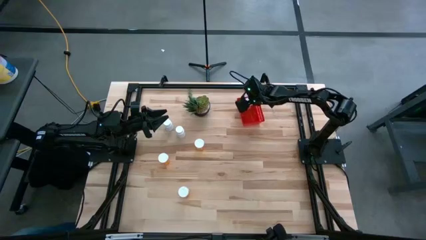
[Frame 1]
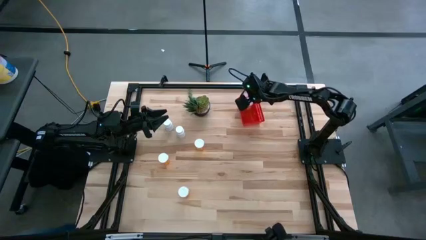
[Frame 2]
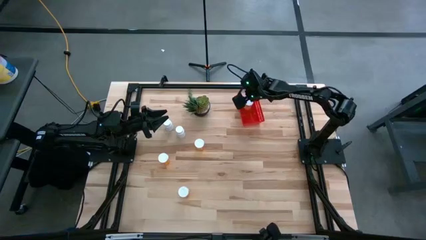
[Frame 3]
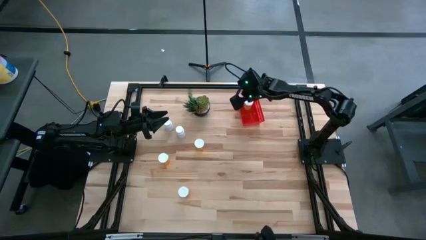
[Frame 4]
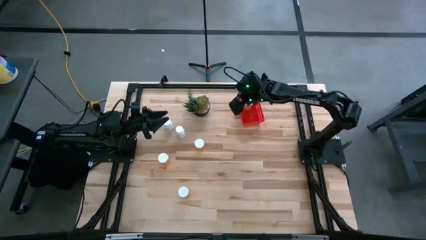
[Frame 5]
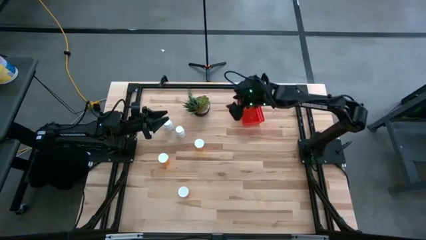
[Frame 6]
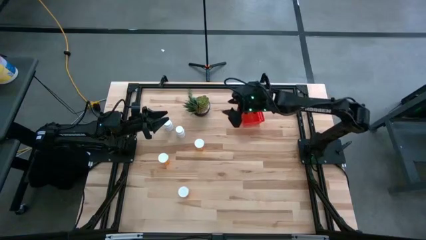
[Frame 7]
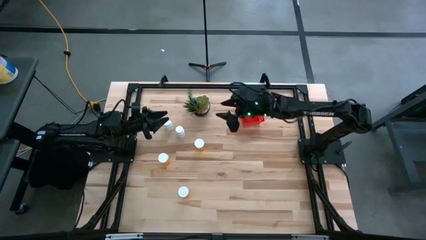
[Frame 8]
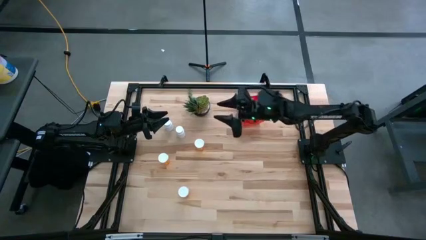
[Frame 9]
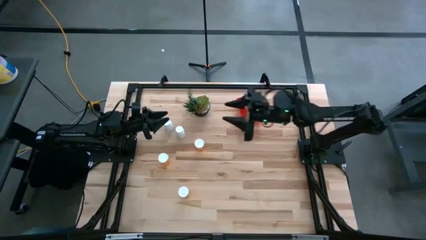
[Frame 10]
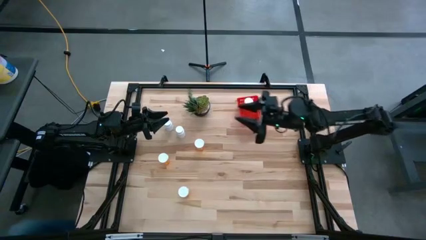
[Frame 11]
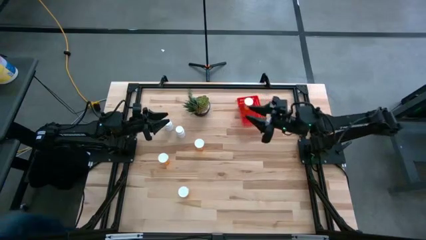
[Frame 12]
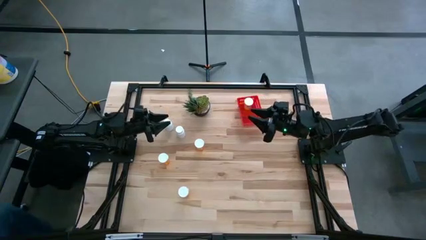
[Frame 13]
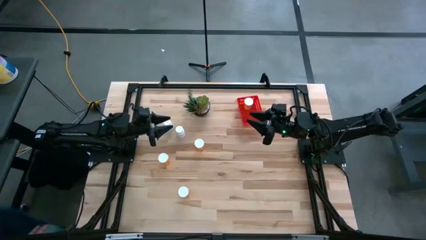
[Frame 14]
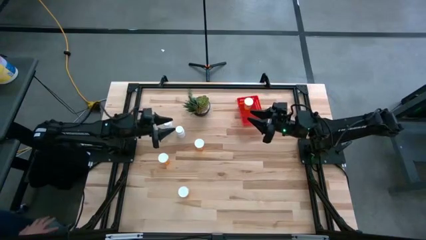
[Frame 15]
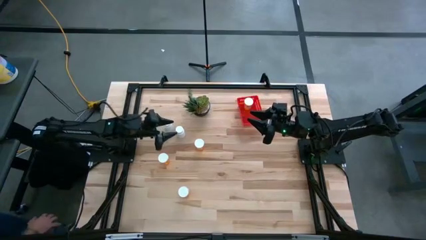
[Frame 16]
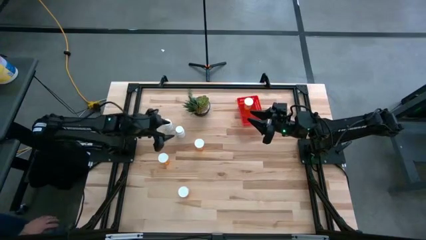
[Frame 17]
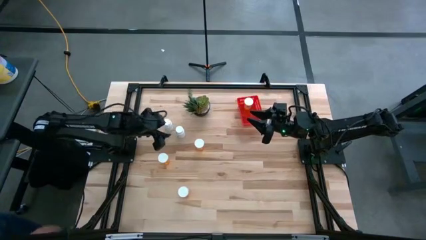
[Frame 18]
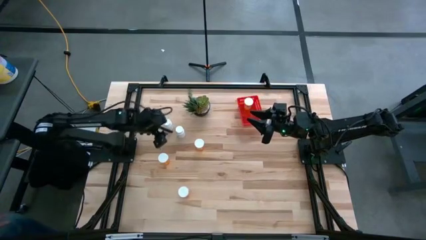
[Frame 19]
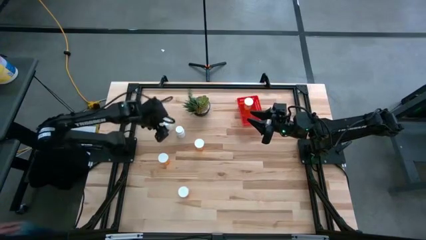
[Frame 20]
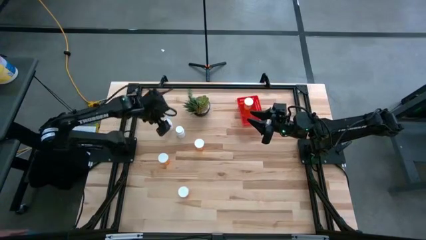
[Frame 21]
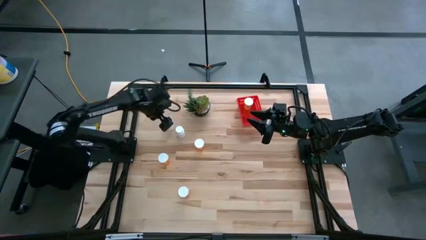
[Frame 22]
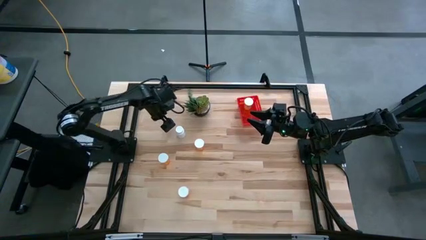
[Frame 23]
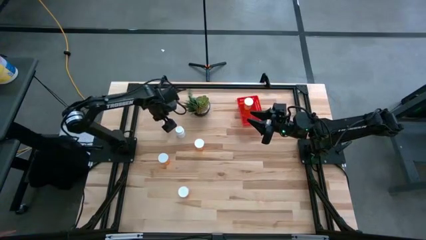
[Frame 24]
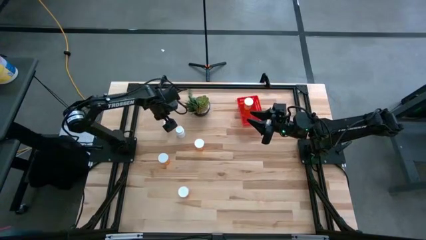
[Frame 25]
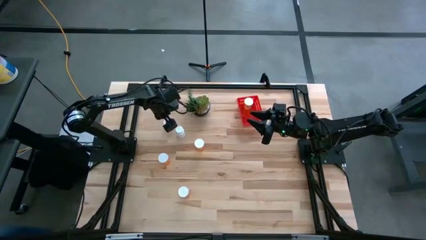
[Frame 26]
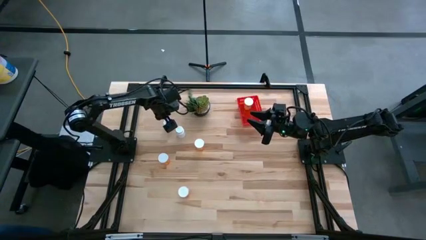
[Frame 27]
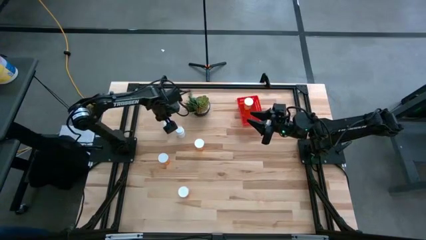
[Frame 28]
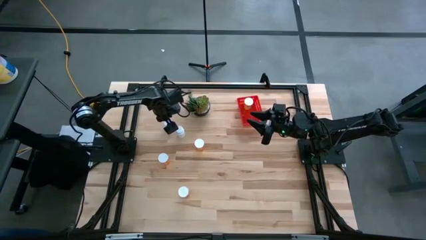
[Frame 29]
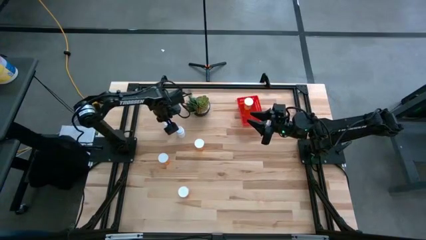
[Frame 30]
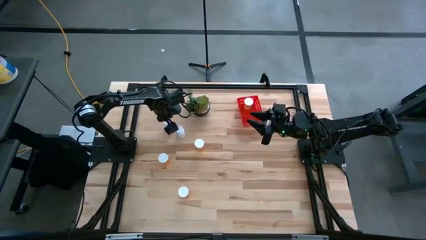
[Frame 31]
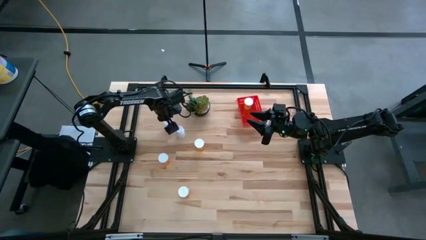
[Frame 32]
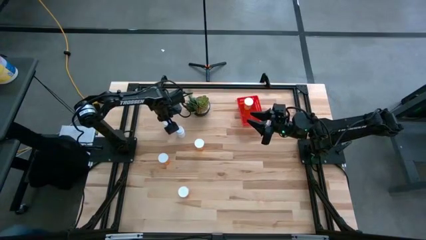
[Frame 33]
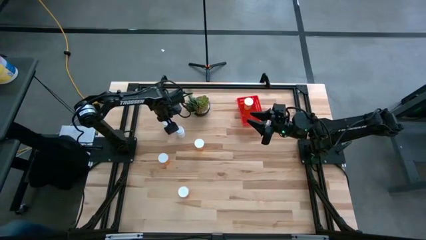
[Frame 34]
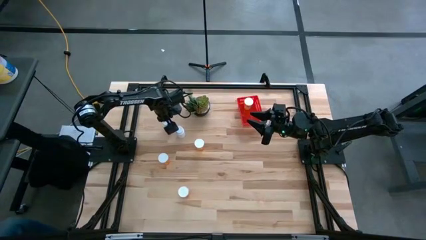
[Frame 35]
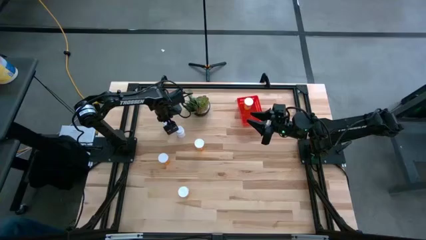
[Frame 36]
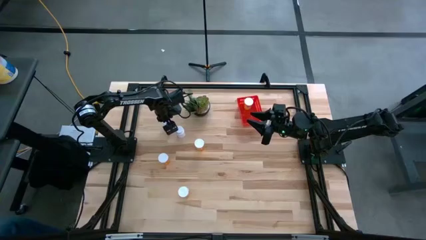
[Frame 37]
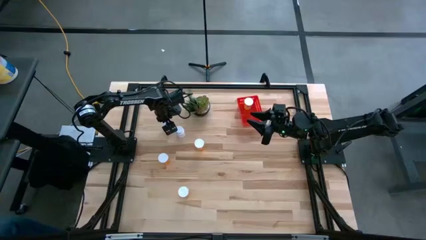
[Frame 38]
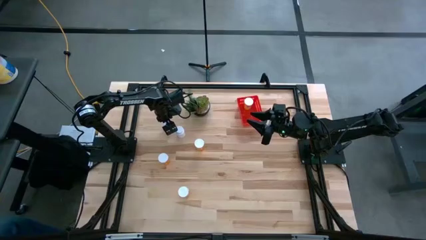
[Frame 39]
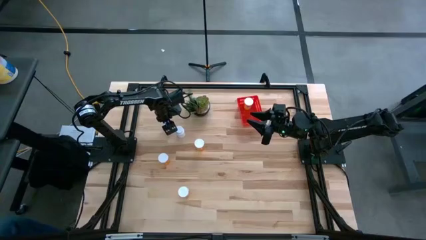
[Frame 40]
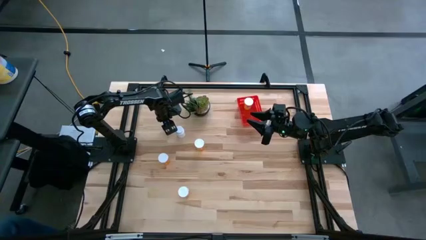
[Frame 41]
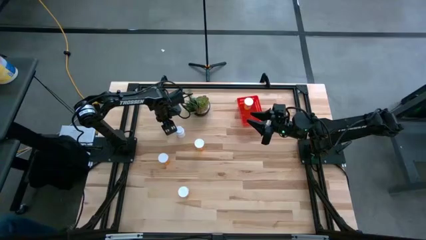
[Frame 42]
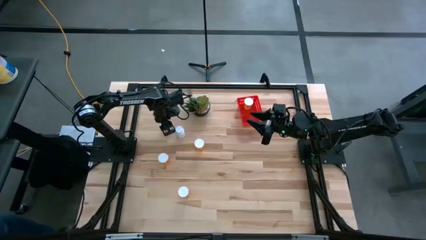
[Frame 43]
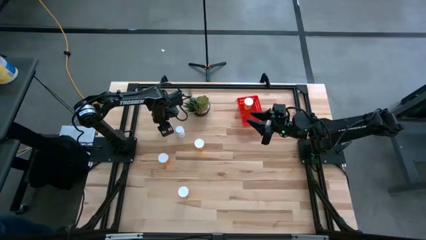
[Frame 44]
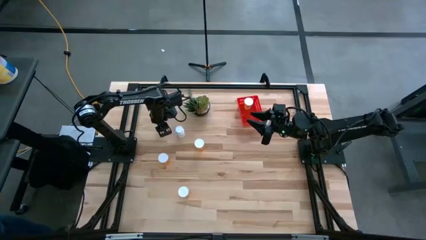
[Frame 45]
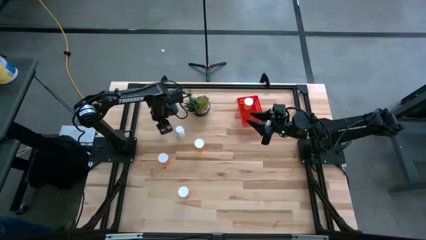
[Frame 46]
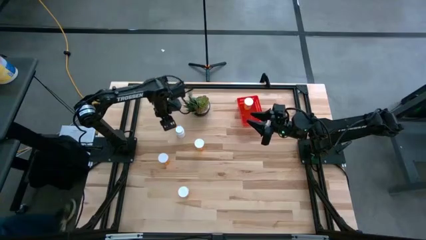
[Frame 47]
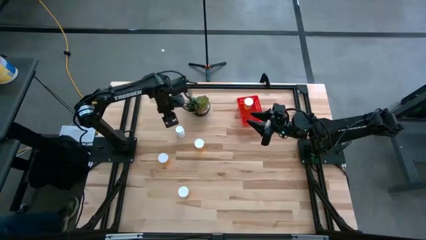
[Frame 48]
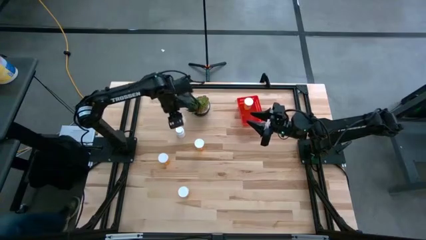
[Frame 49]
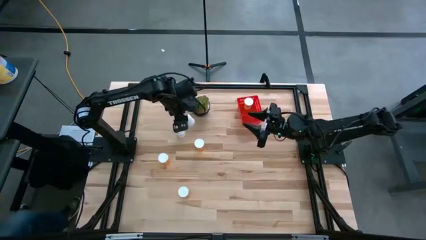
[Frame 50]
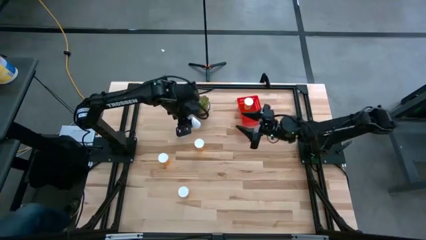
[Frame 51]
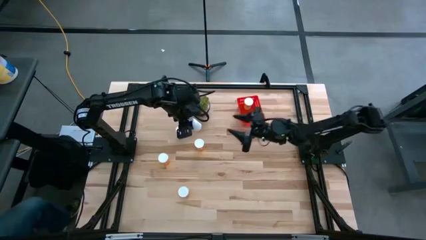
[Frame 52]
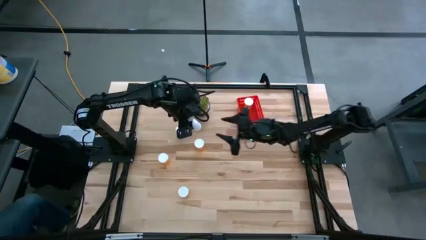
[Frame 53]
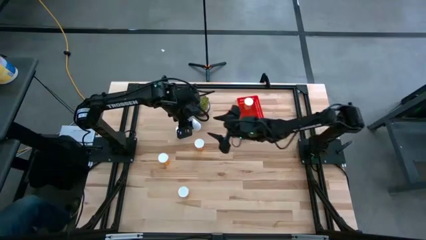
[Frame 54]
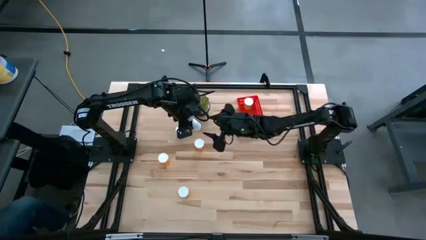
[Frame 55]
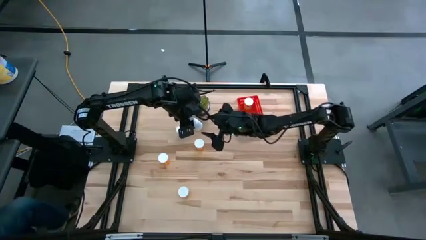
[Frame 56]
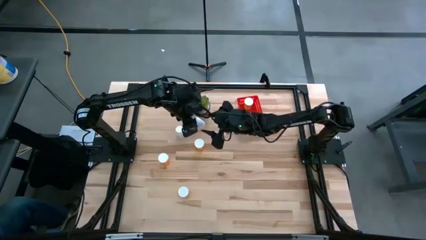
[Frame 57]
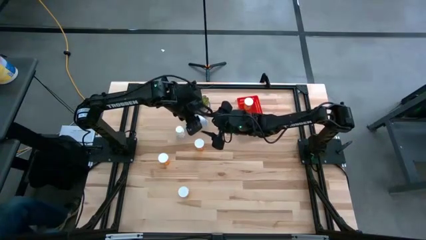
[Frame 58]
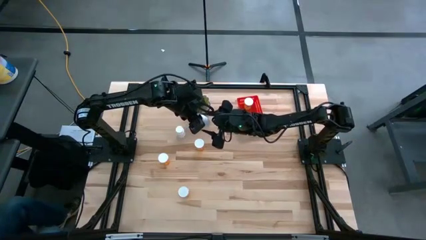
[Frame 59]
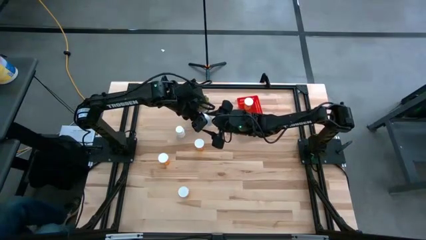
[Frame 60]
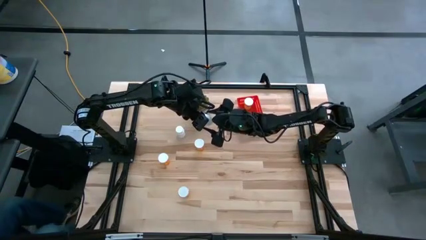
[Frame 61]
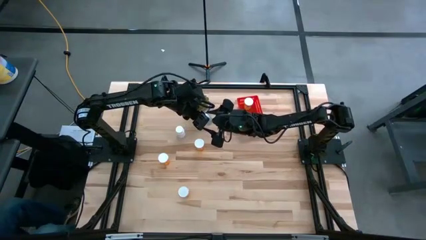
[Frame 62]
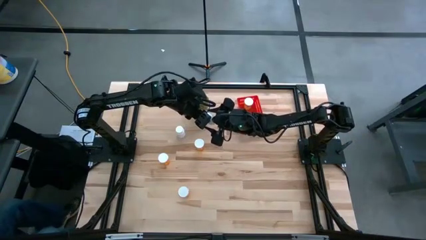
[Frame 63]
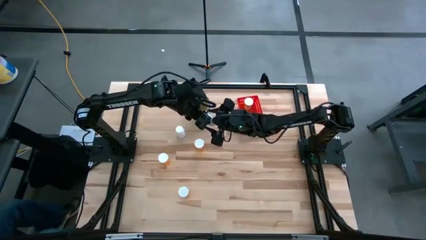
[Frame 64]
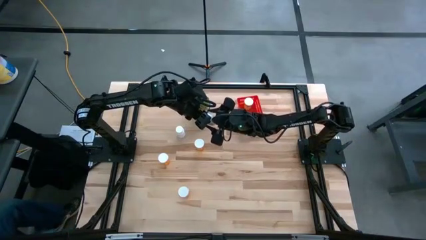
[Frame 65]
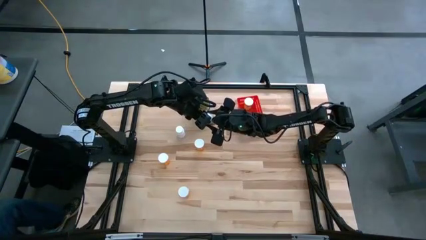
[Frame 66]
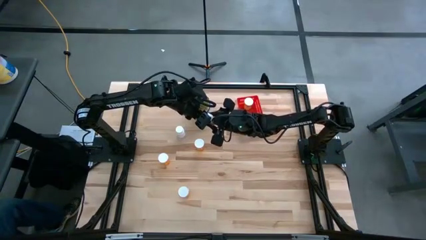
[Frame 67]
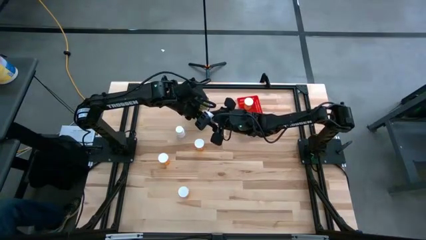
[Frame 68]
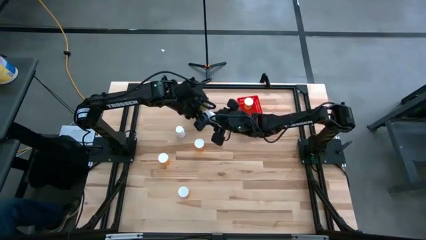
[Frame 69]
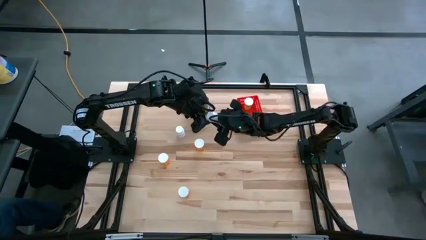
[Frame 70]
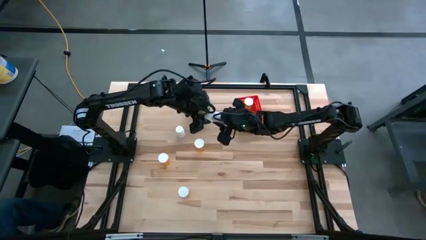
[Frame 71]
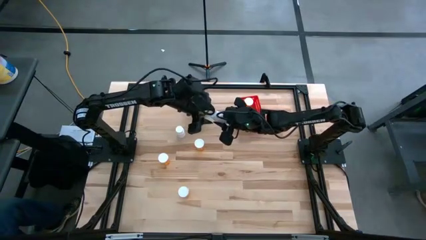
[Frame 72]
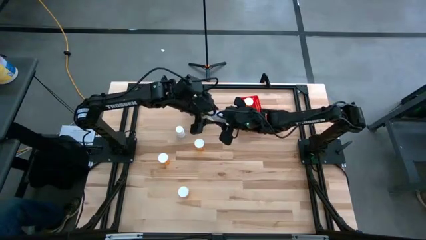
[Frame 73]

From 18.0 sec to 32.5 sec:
Task: Pick and place pill bottles into a basket
Put the top white pill bottle into the bin
